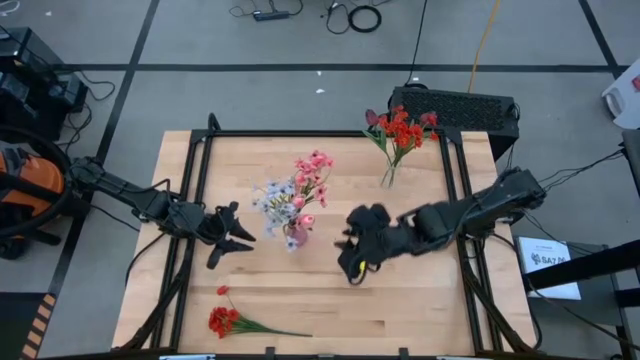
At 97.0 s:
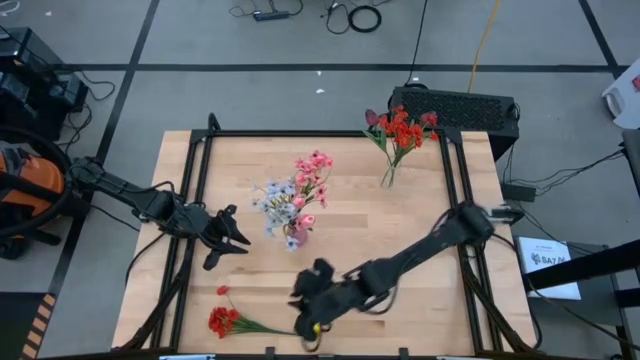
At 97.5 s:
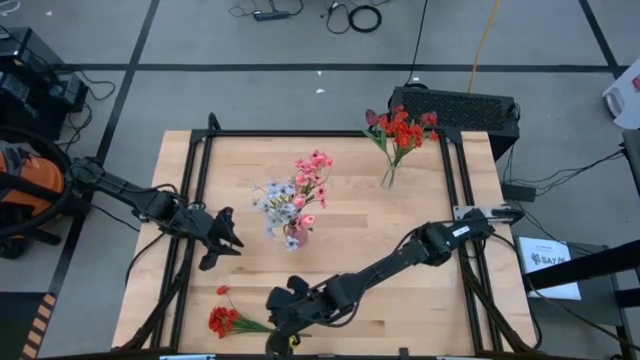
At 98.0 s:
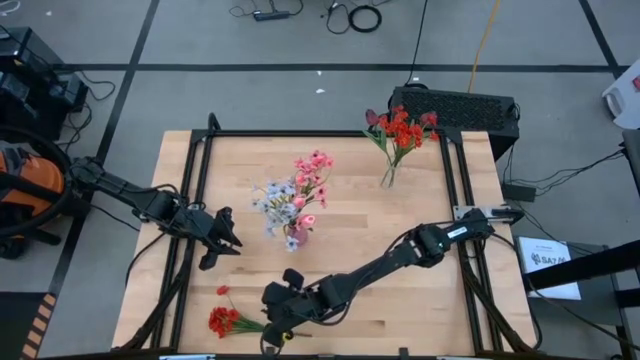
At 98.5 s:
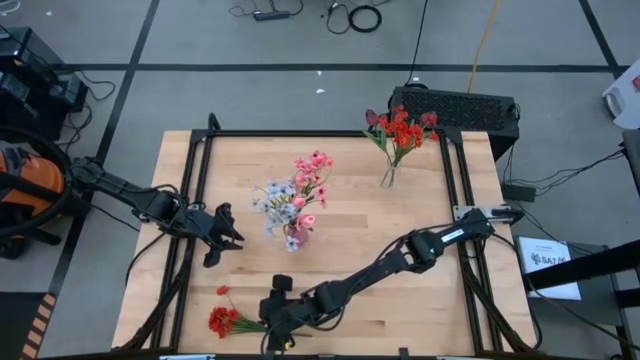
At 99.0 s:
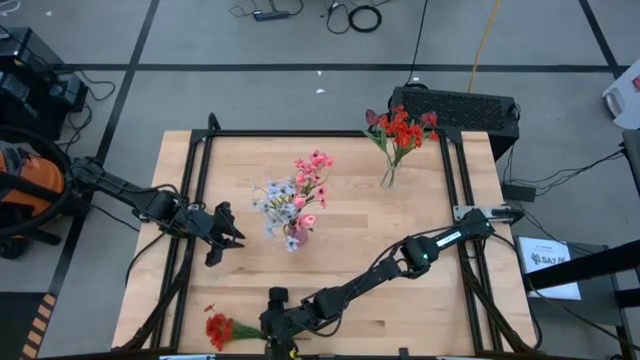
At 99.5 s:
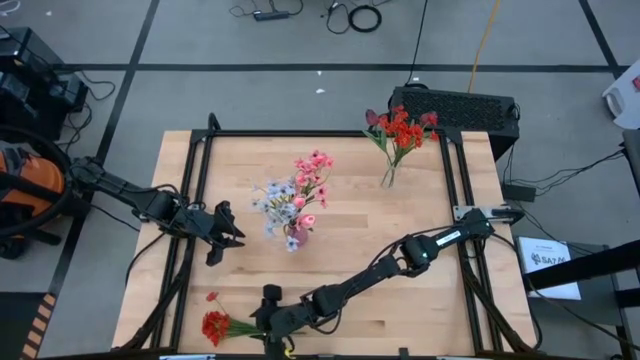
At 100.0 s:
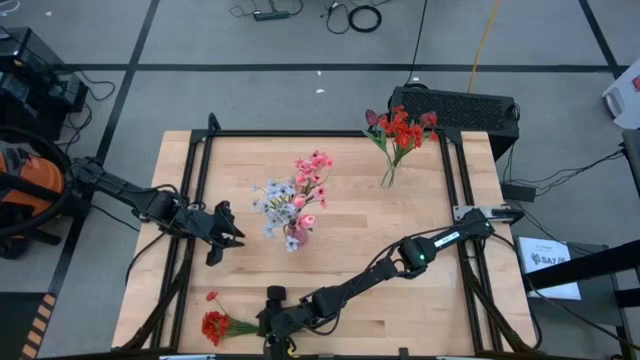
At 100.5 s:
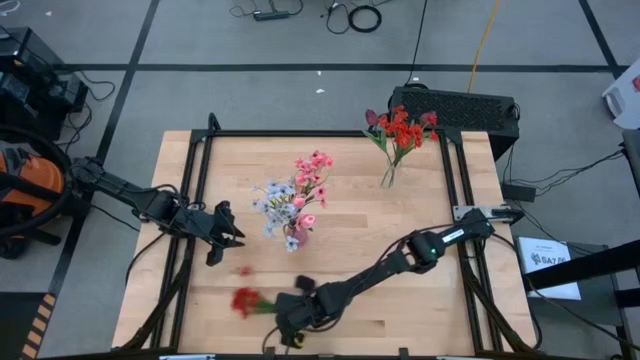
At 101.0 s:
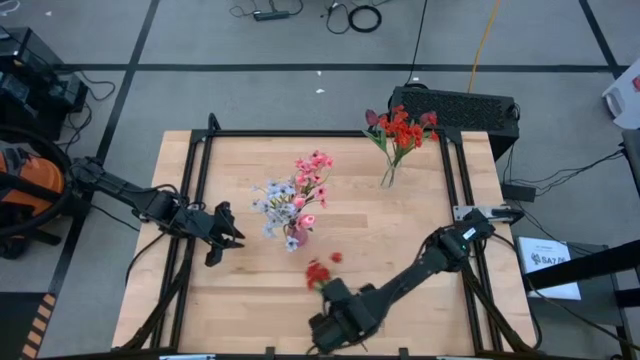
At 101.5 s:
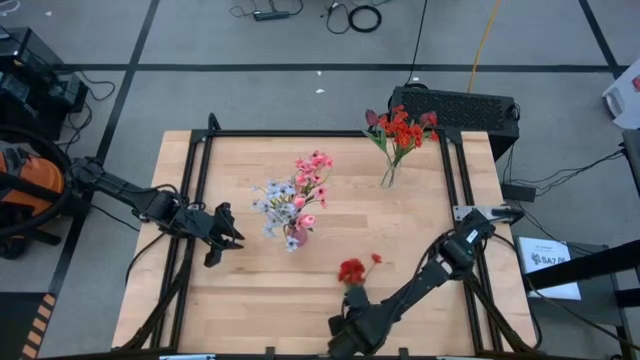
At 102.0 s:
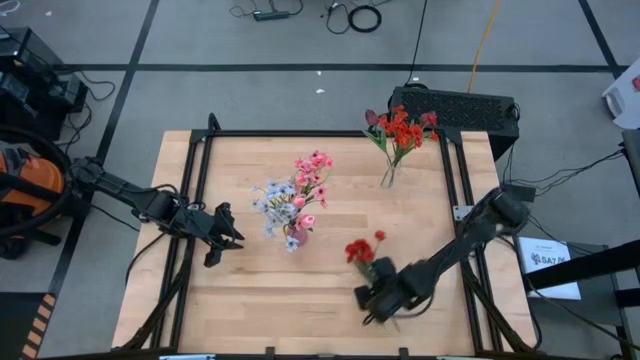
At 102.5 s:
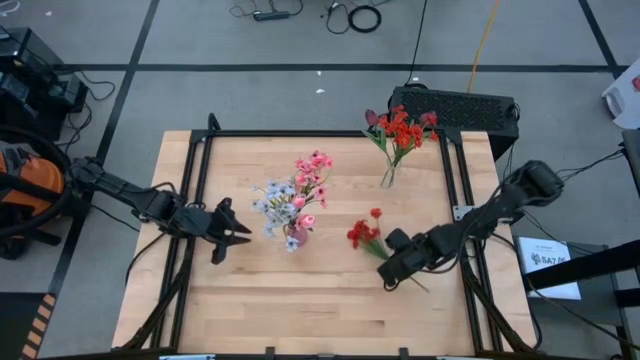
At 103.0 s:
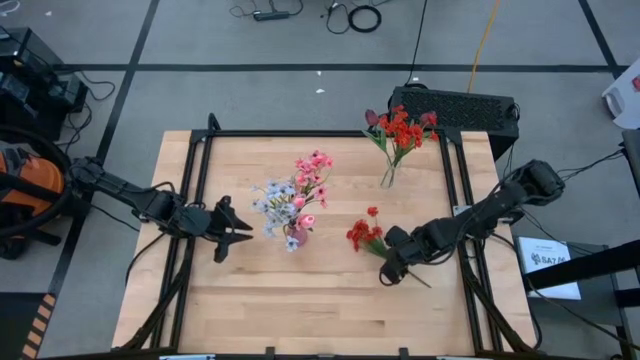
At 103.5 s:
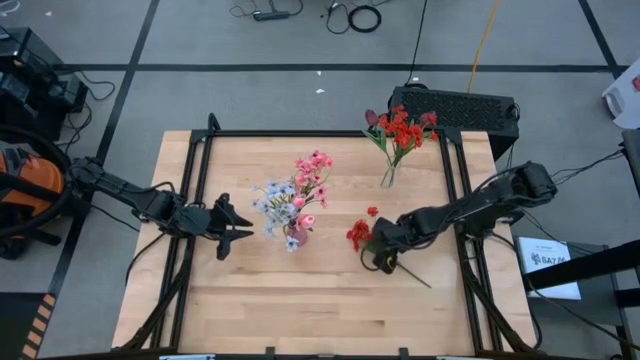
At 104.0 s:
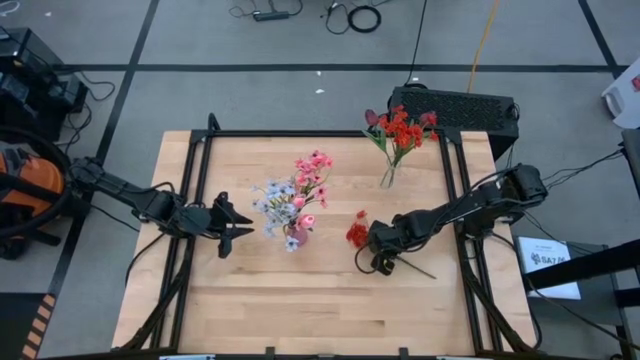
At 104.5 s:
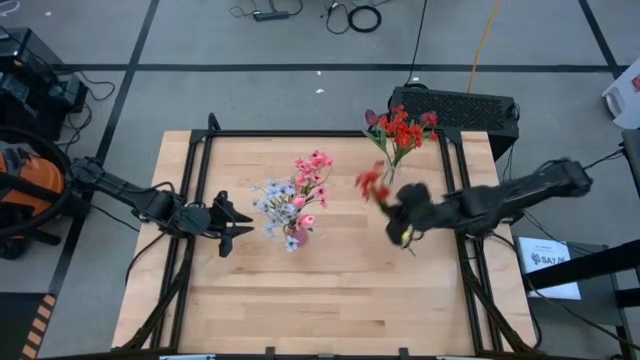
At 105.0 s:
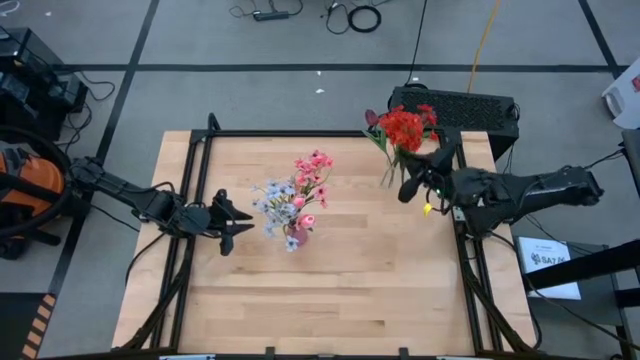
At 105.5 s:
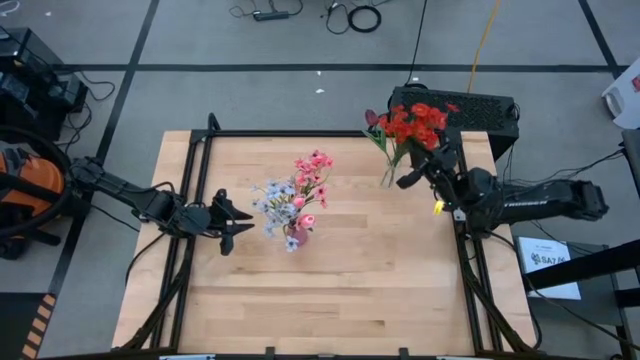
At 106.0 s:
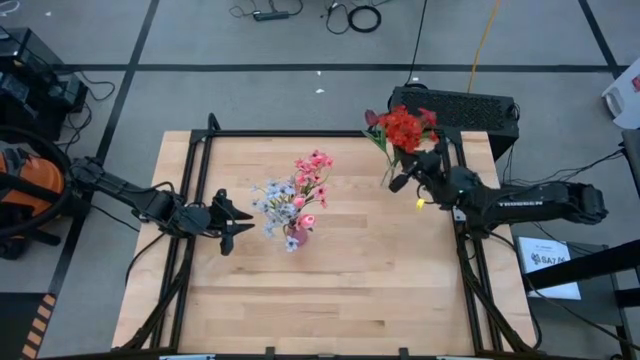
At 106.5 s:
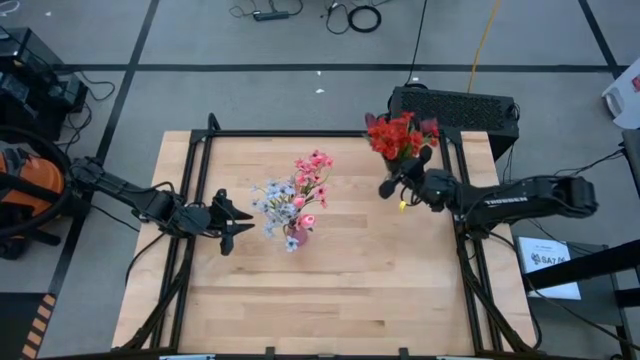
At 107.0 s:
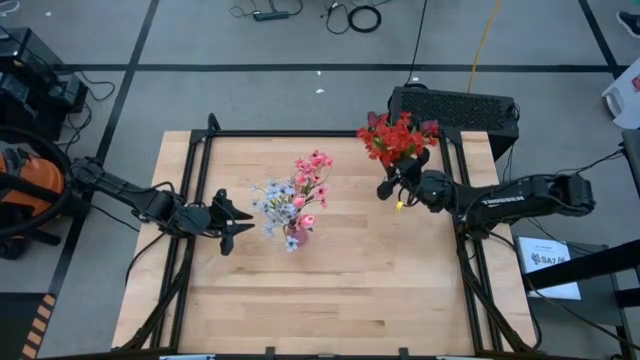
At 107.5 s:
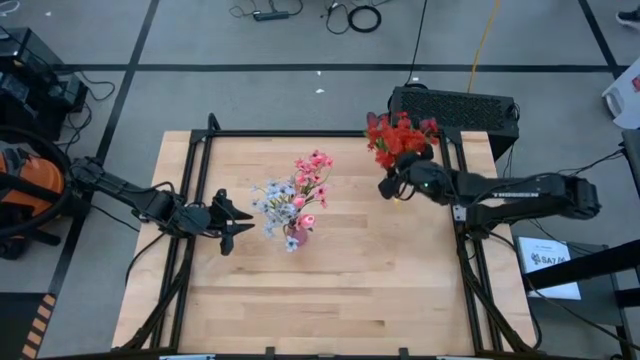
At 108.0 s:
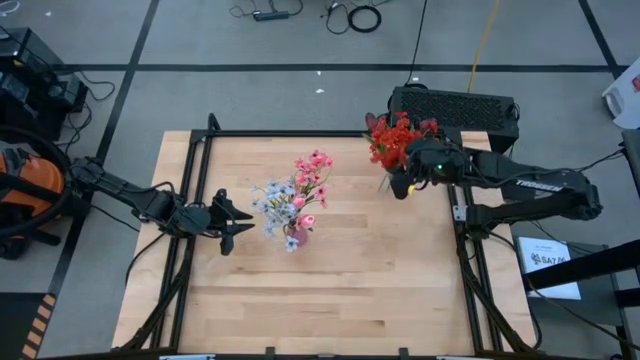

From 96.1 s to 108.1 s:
Task: Sort flowers into vase by color
Put the red flowers into the transparent vase

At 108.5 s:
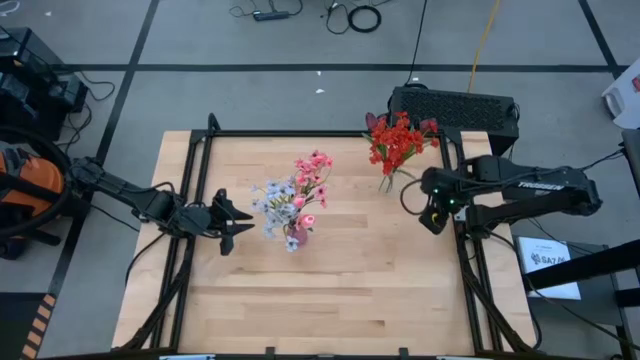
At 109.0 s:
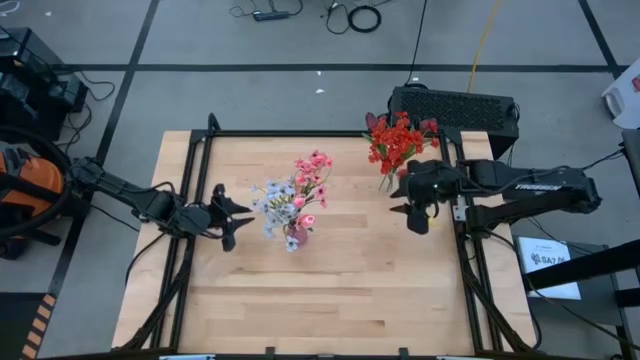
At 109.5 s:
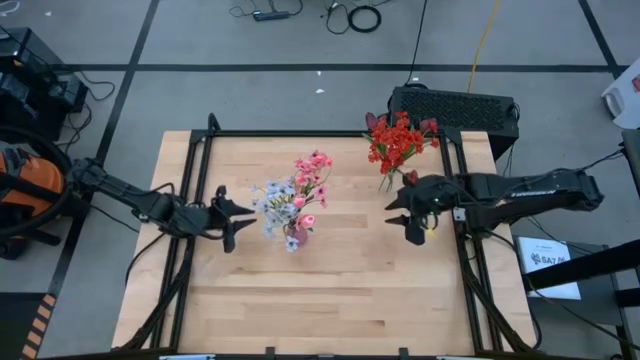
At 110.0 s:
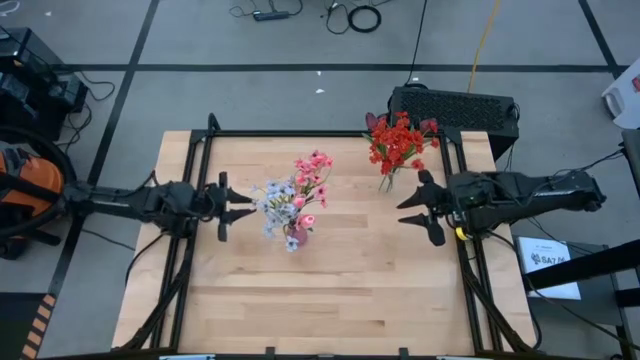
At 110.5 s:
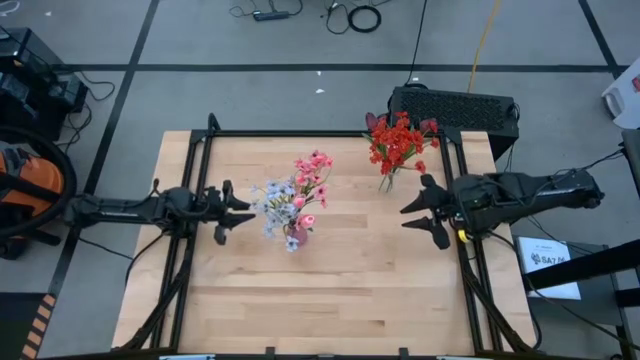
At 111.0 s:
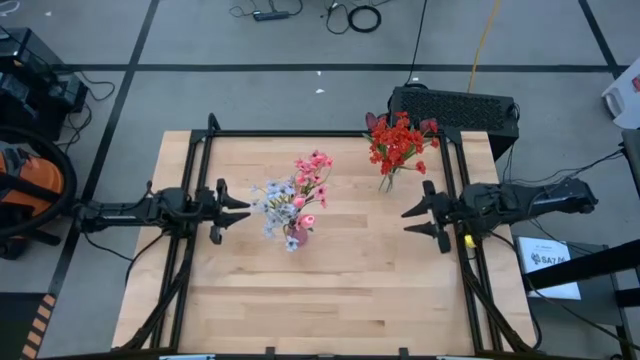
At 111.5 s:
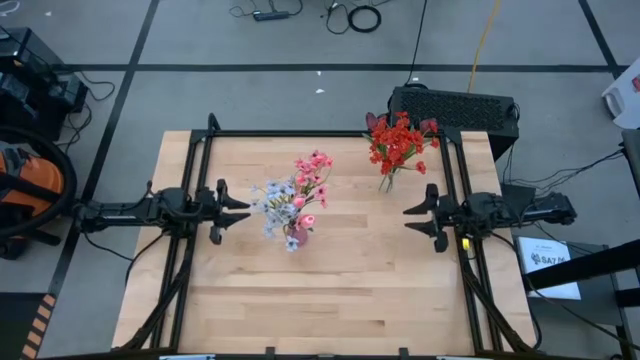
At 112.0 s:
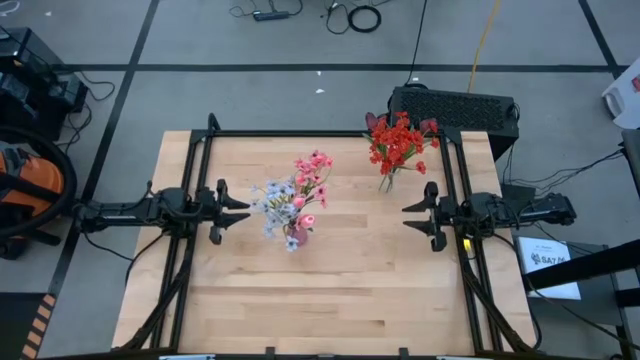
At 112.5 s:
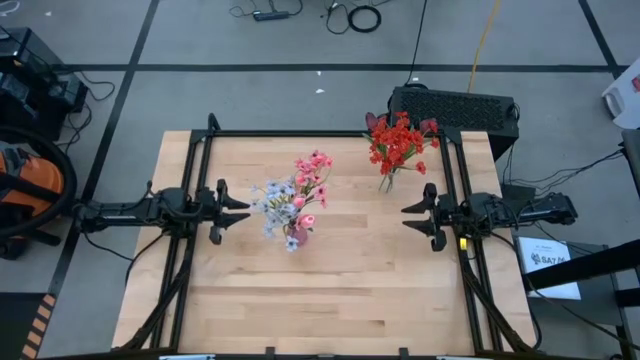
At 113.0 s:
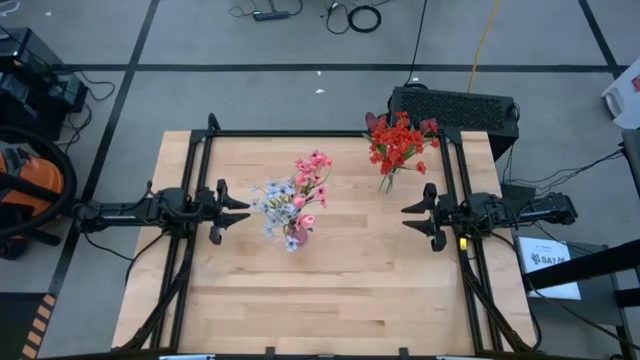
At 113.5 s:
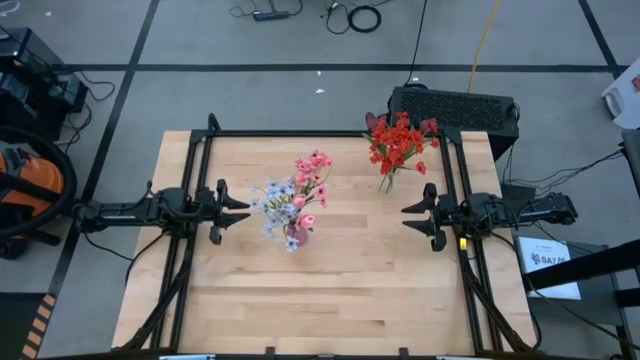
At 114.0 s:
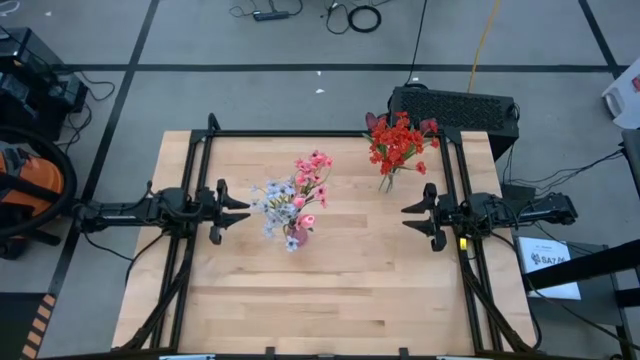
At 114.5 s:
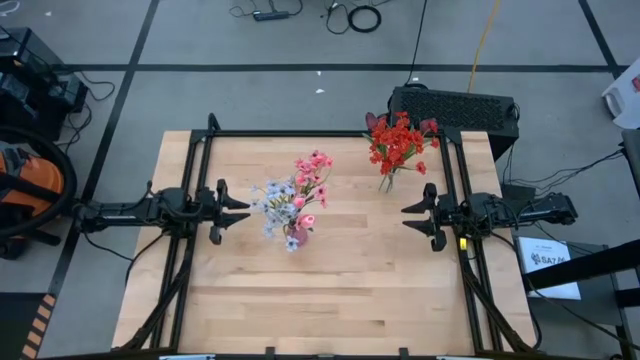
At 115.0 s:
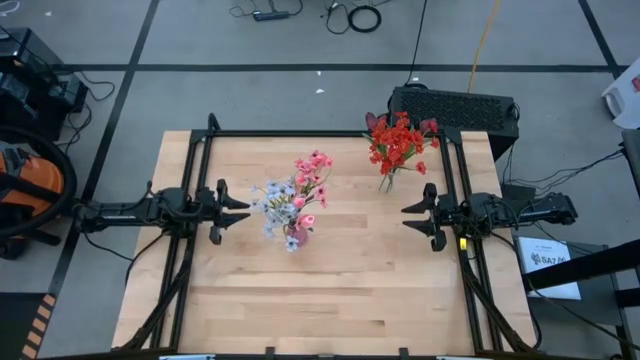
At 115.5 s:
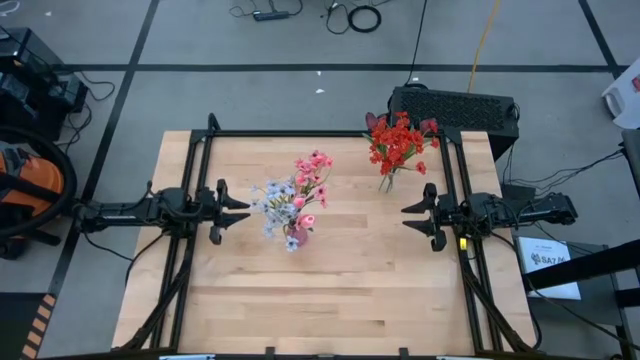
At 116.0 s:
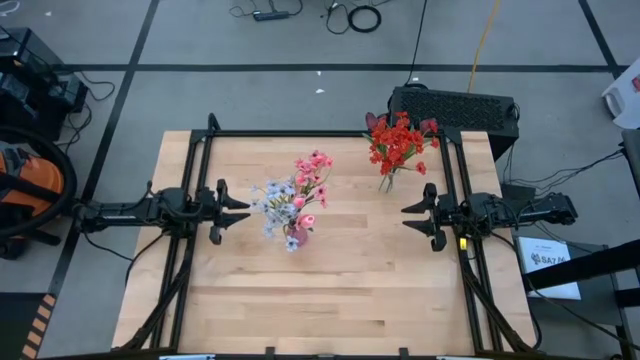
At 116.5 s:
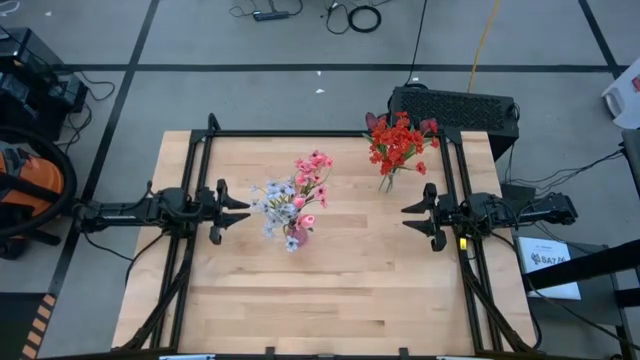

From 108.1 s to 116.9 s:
Return to Home Position

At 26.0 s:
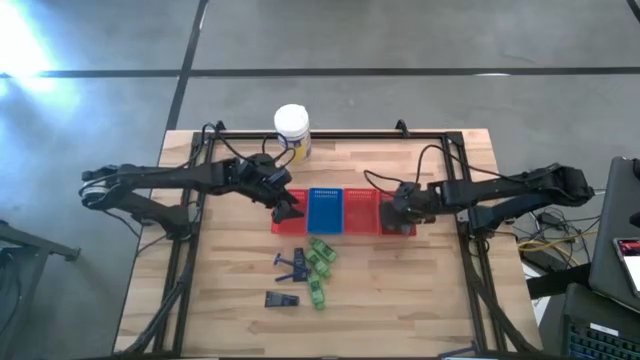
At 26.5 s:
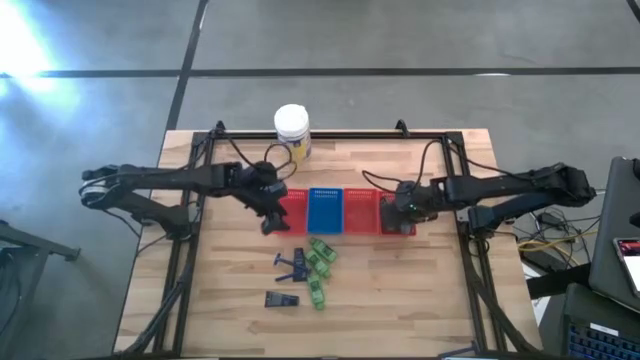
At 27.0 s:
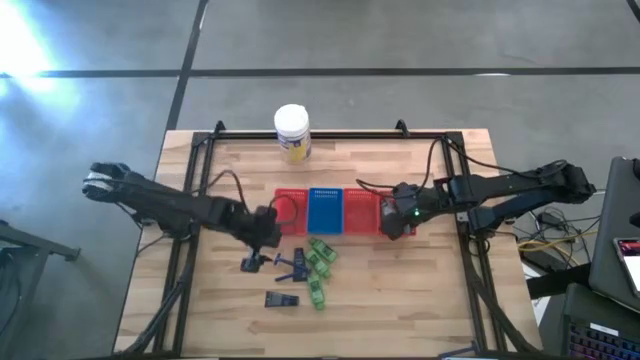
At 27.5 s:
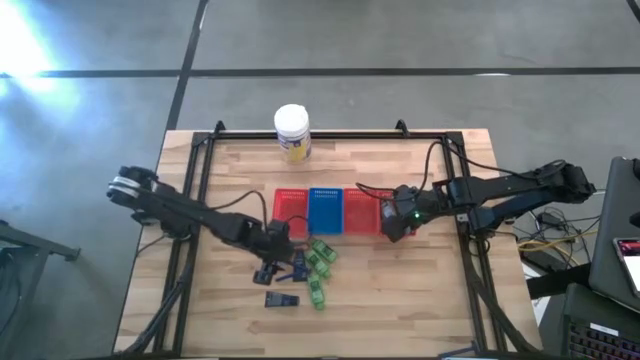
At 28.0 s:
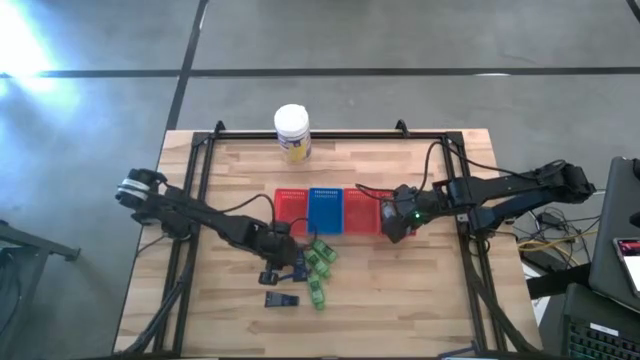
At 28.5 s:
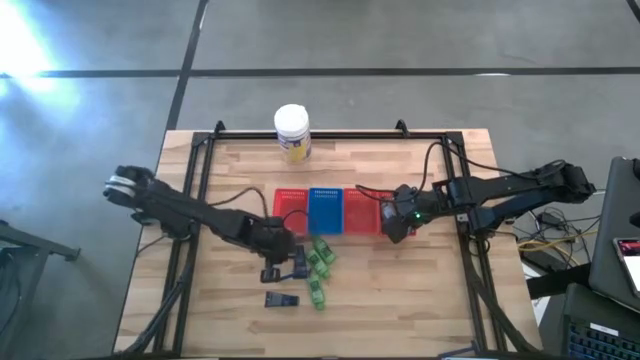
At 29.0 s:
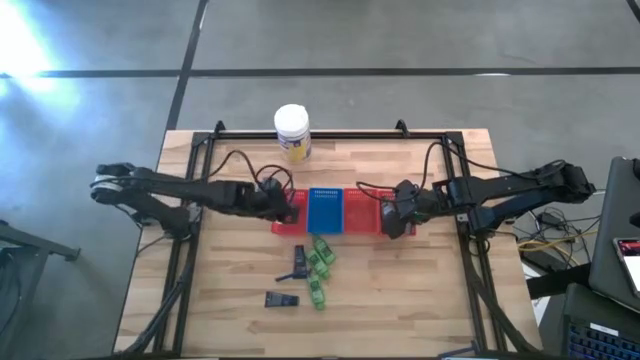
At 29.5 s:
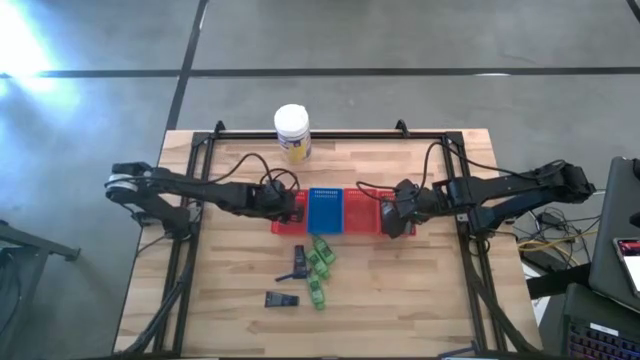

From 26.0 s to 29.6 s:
Task: Pick & Place Travel size toiletries
Put the top razor into the left red bin
